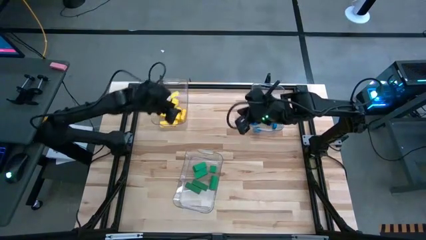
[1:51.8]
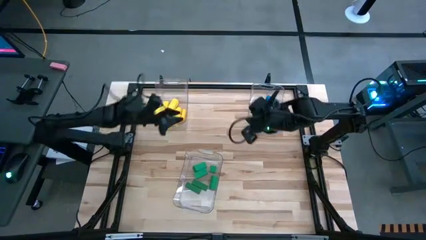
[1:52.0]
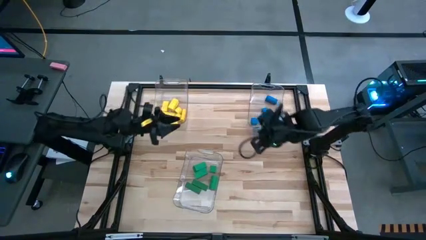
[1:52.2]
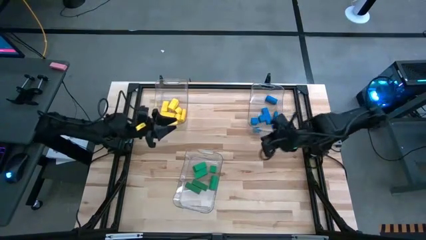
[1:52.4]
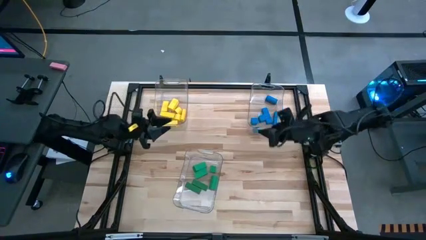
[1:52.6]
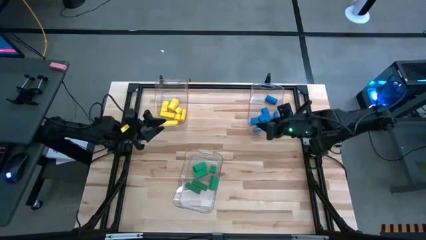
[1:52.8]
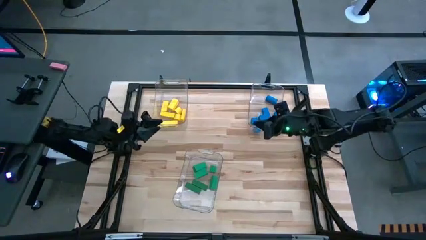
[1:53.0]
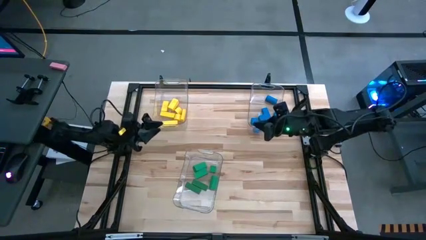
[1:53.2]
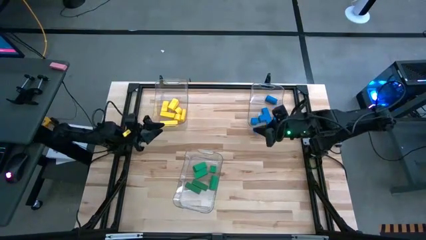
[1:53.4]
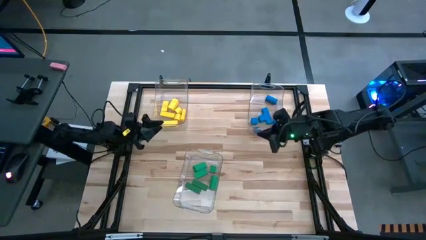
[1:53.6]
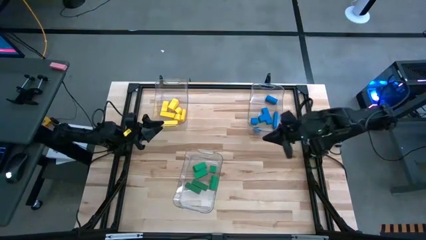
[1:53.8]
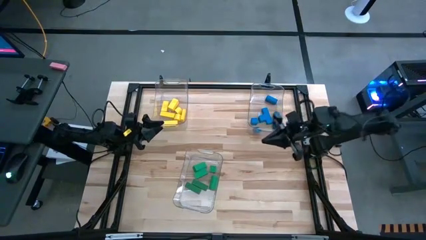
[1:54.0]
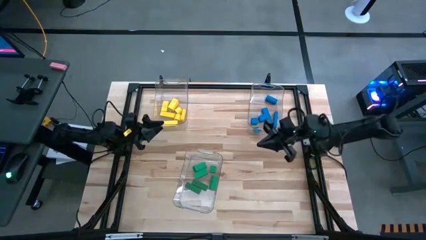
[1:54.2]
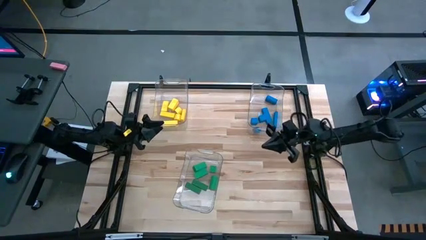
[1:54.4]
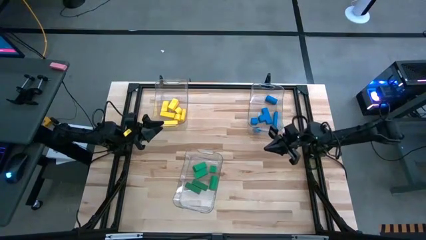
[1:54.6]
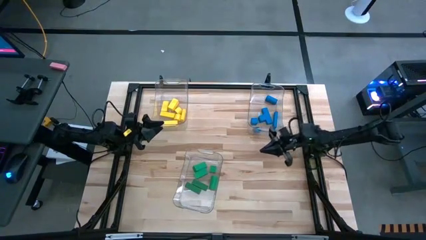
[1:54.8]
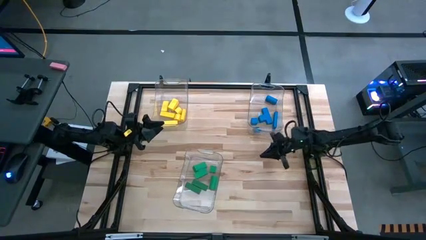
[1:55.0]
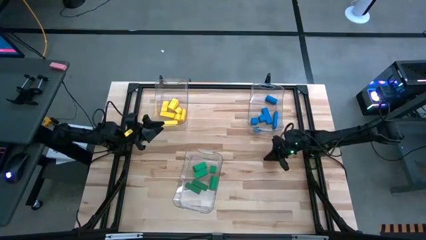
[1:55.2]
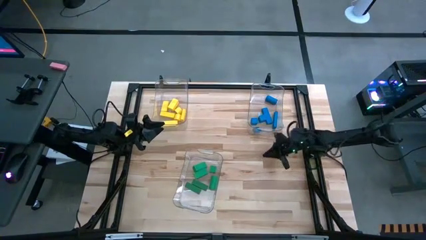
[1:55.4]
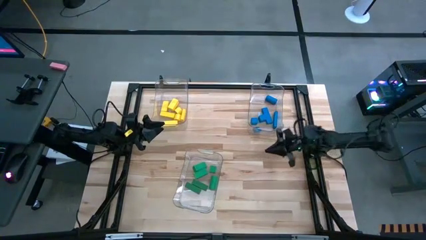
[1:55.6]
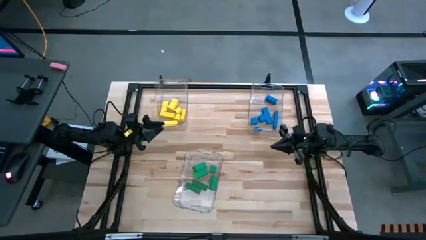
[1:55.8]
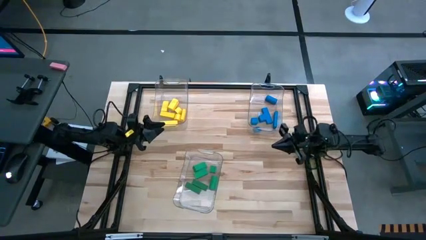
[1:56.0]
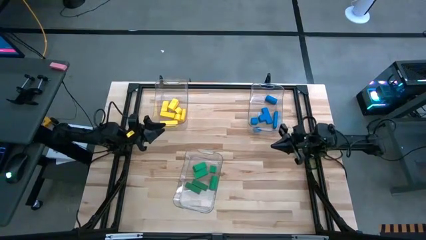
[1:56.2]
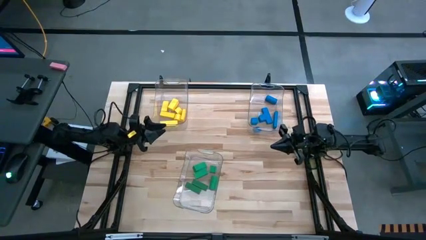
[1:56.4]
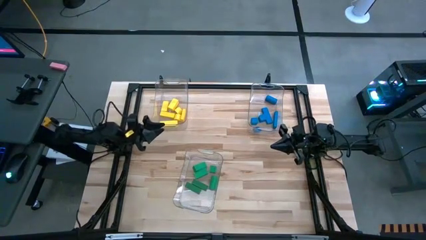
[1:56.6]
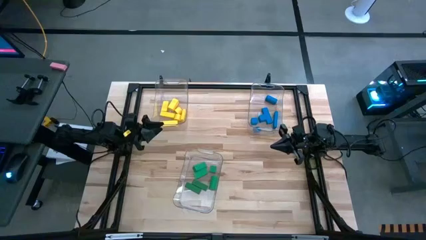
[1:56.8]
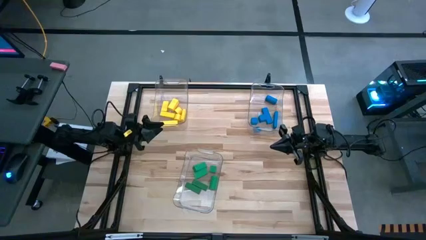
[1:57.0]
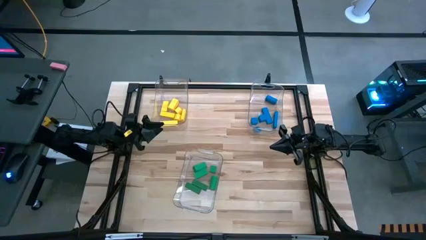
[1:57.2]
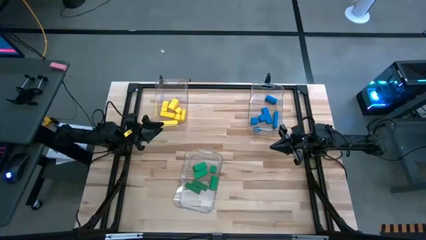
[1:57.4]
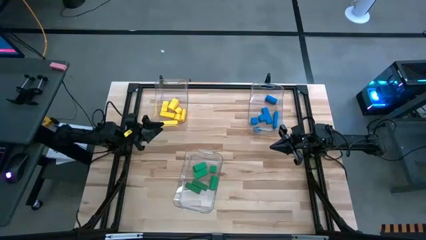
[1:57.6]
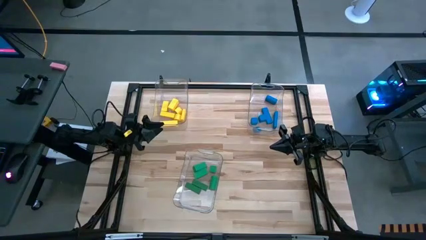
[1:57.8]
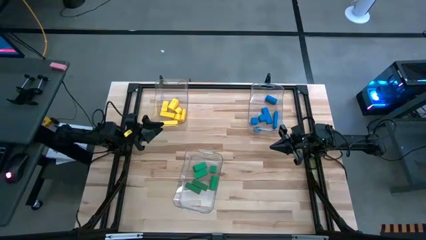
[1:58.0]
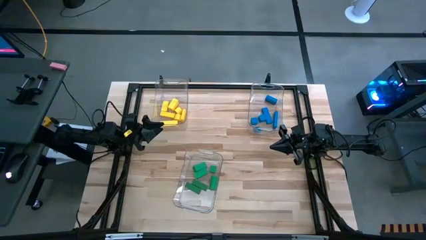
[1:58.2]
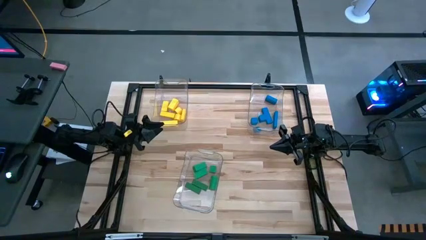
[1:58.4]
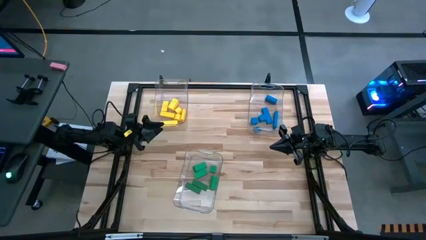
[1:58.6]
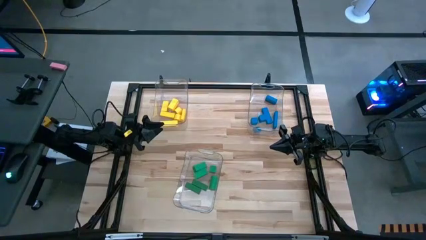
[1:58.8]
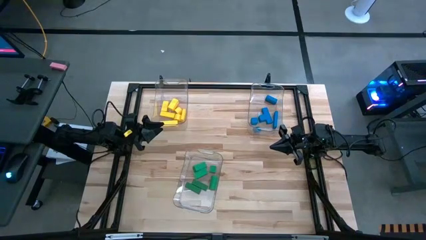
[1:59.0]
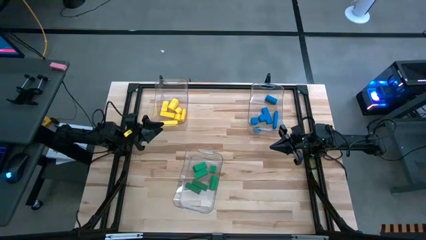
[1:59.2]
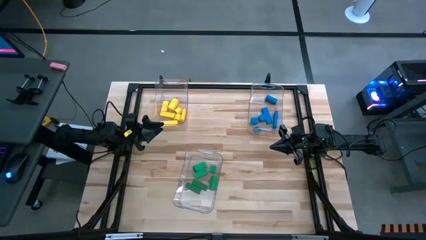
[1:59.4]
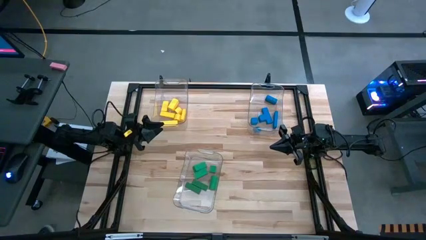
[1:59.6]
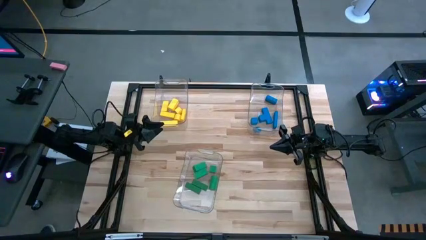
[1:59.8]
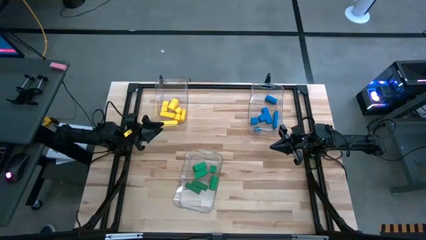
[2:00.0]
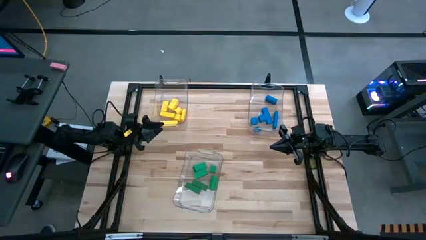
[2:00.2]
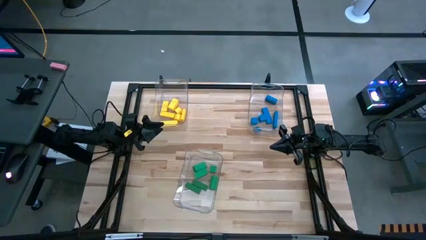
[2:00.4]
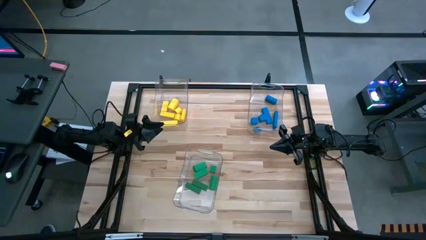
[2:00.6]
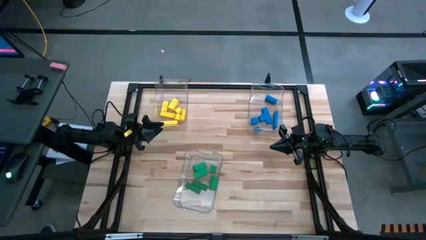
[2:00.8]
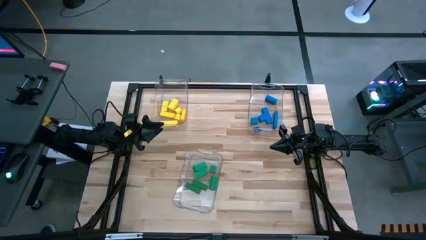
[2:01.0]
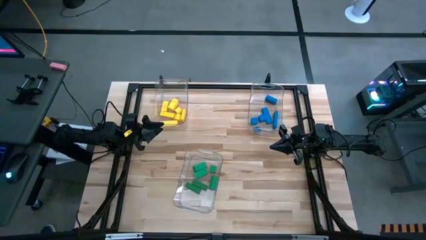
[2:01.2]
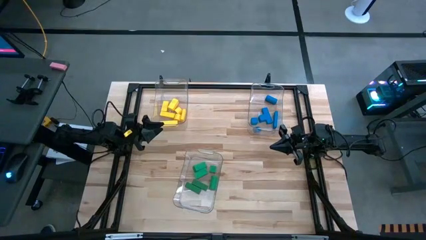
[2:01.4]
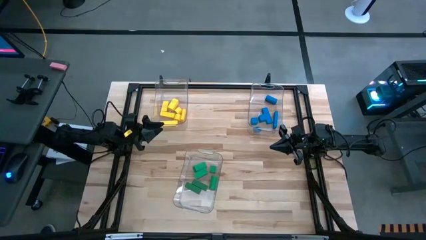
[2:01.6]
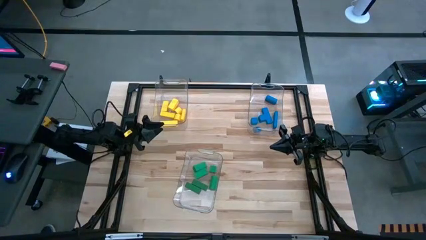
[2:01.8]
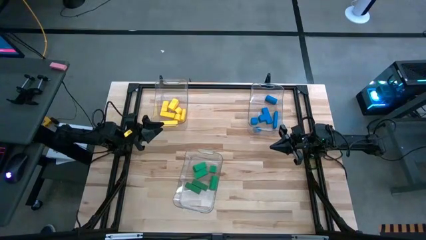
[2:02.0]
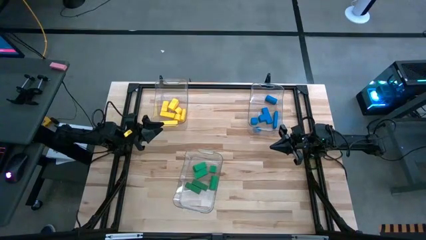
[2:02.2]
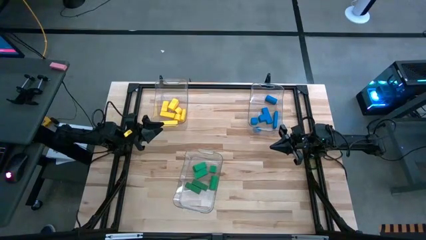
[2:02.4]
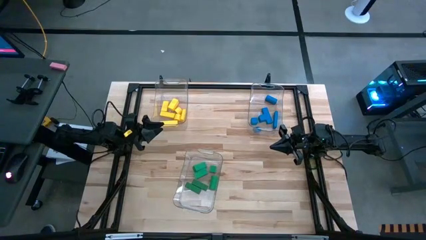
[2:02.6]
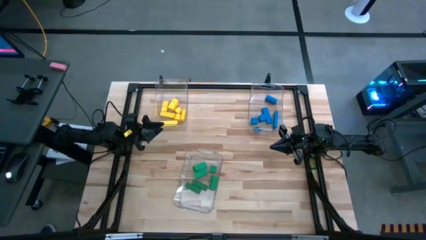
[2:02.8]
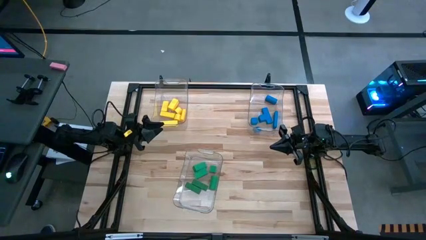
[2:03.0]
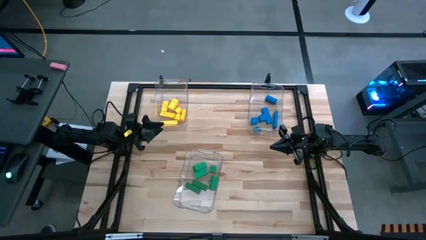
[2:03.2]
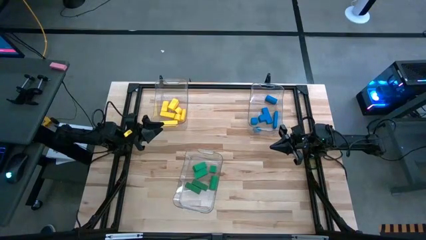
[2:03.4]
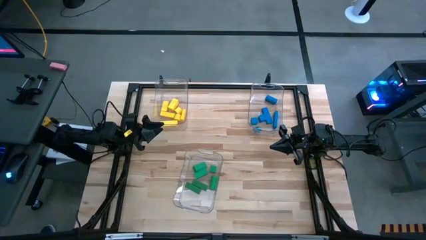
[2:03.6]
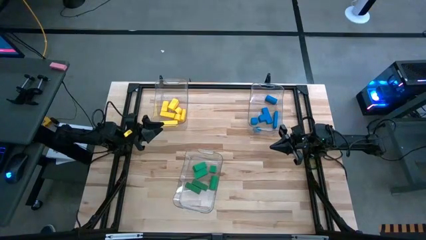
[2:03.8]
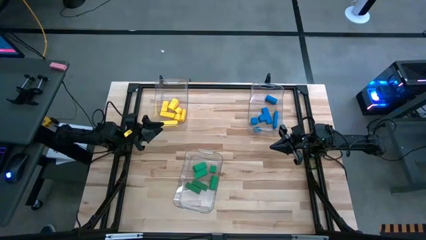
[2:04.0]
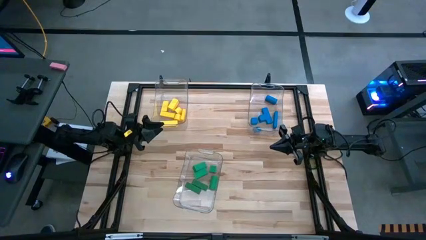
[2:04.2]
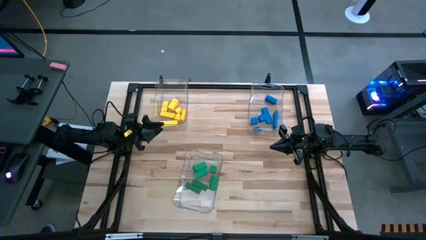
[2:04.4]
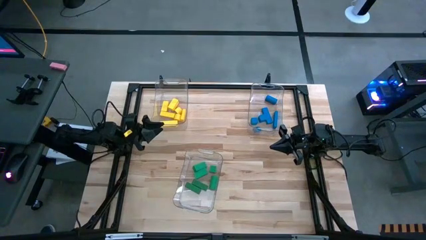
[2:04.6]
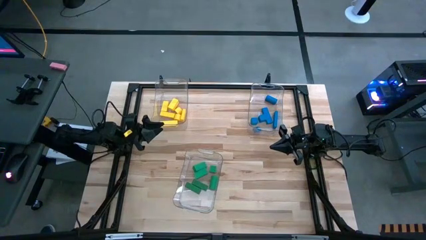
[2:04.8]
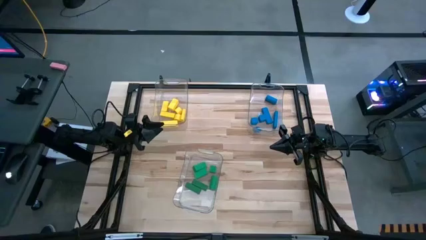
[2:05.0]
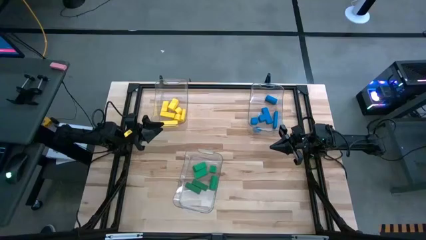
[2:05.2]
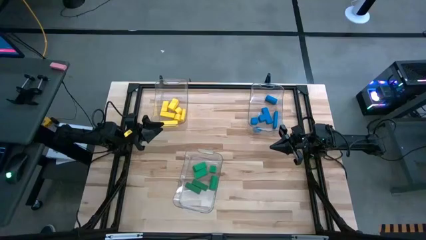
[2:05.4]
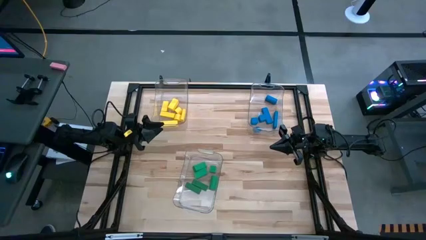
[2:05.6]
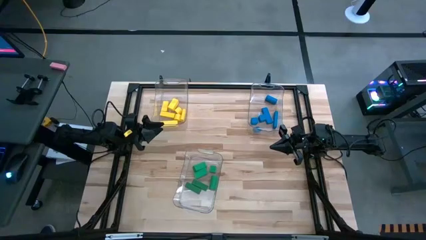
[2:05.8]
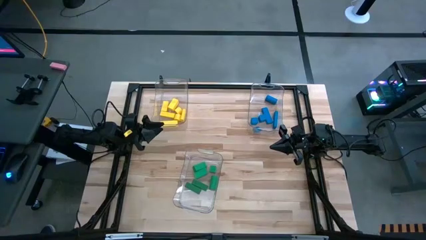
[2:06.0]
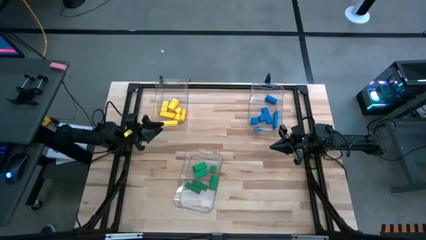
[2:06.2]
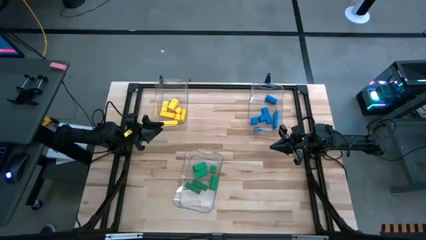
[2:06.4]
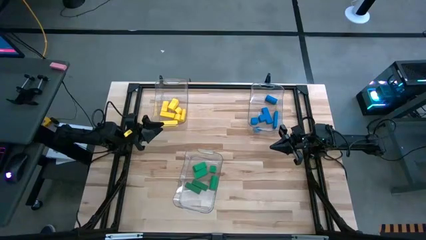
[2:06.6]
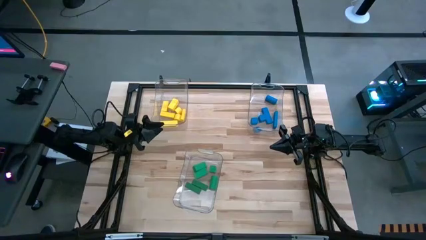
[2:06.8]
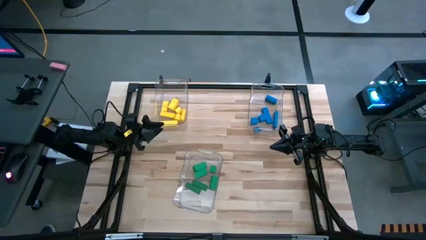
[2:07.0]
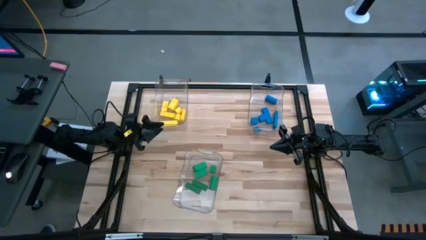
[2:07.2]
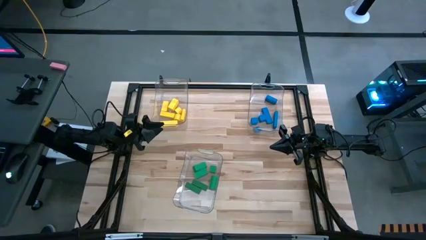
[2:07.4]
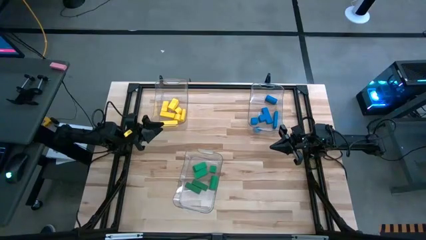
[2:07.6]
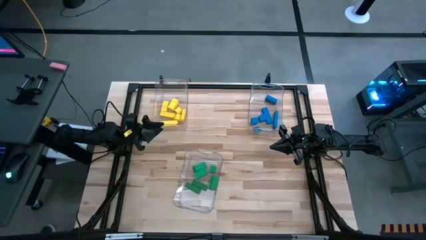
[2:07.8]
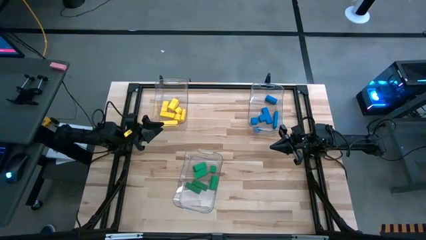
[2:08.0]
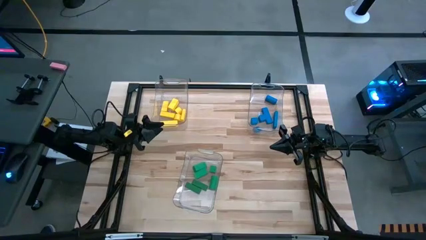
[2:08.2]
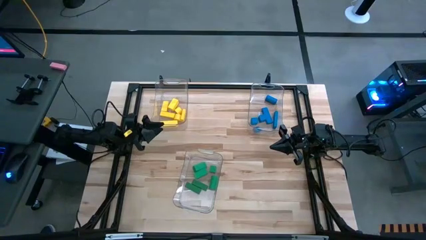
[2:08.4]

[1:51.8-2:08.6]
Task: Sort blocks
Return to Home Position
